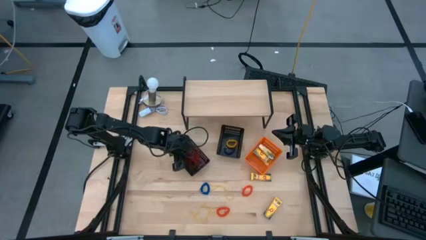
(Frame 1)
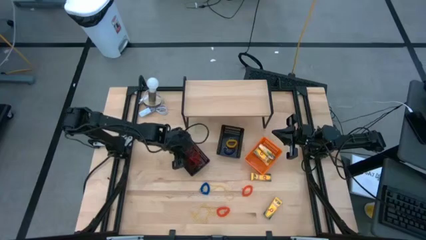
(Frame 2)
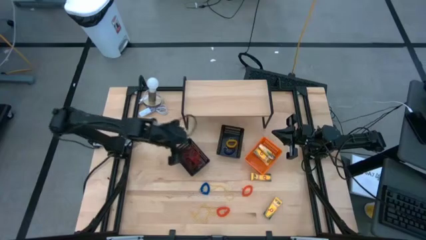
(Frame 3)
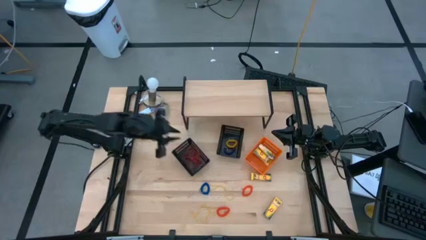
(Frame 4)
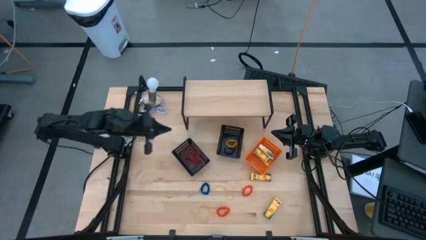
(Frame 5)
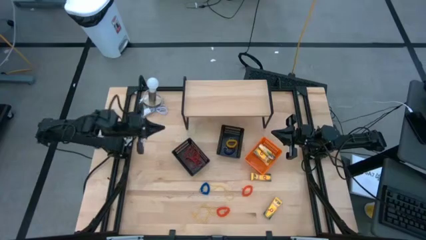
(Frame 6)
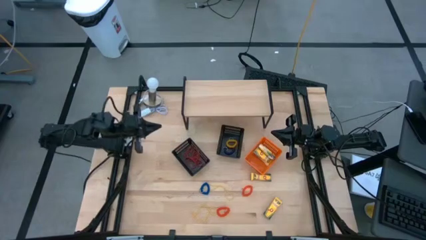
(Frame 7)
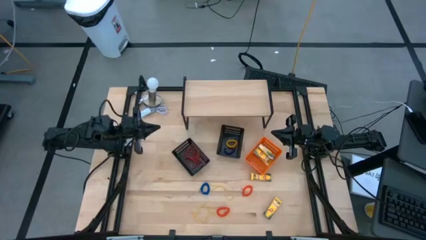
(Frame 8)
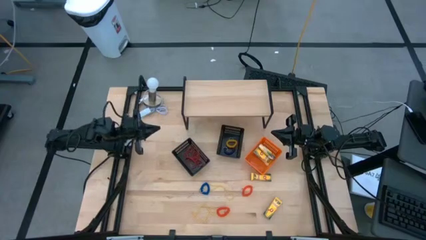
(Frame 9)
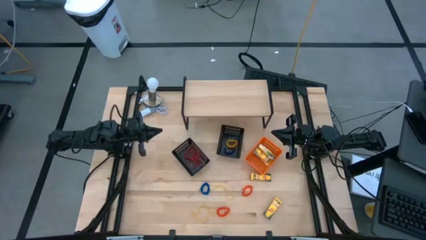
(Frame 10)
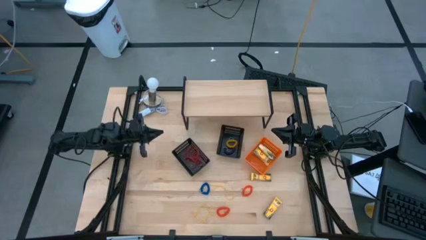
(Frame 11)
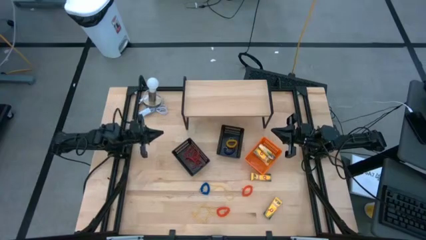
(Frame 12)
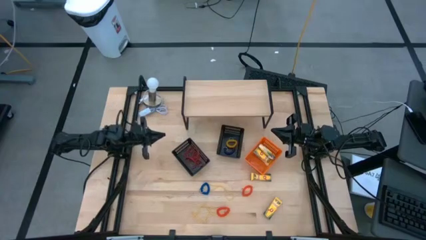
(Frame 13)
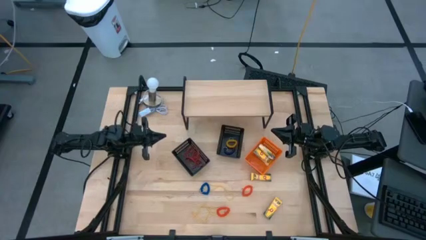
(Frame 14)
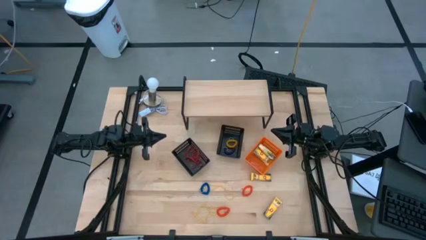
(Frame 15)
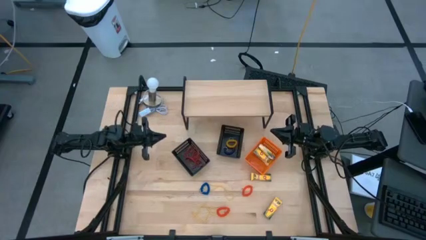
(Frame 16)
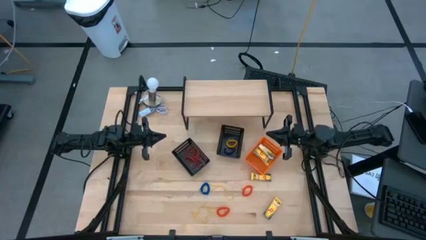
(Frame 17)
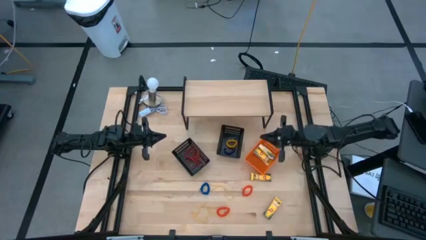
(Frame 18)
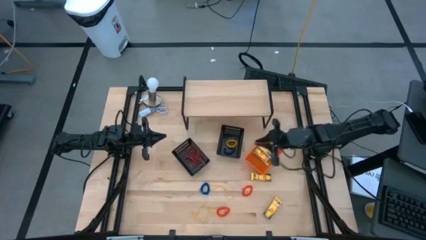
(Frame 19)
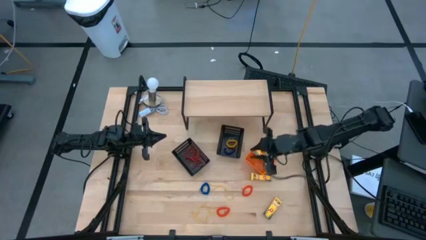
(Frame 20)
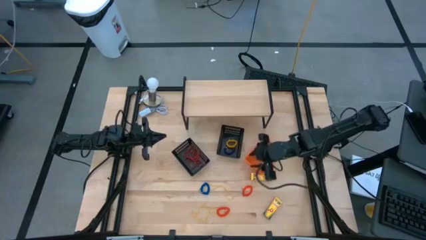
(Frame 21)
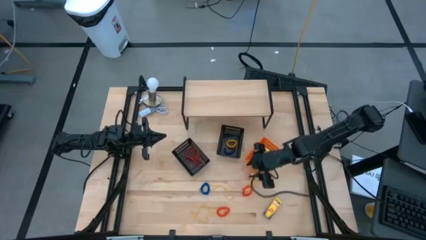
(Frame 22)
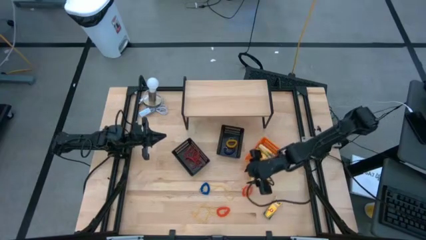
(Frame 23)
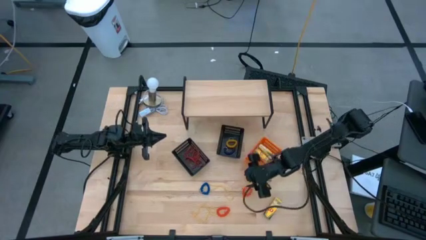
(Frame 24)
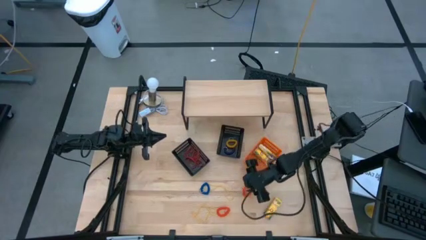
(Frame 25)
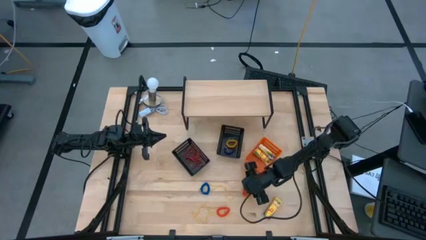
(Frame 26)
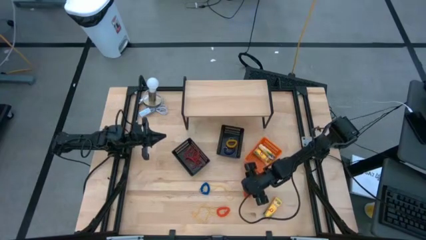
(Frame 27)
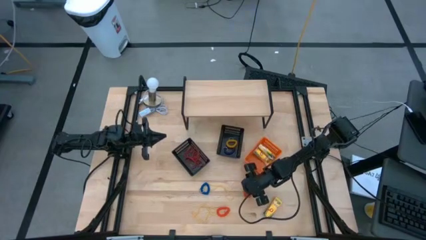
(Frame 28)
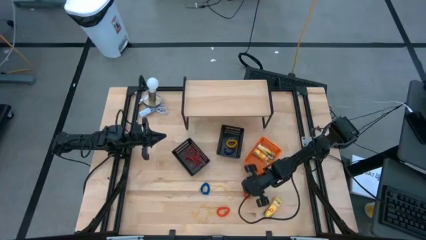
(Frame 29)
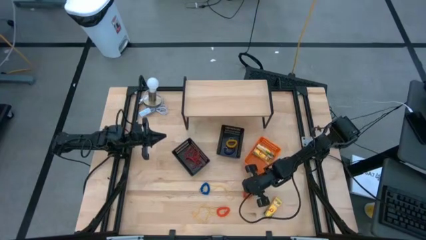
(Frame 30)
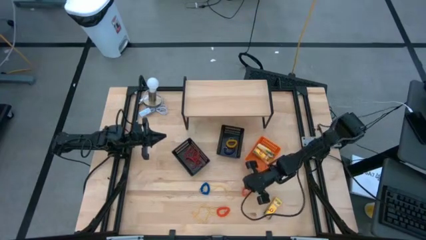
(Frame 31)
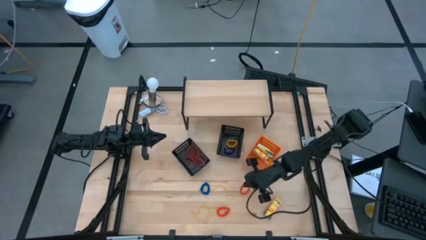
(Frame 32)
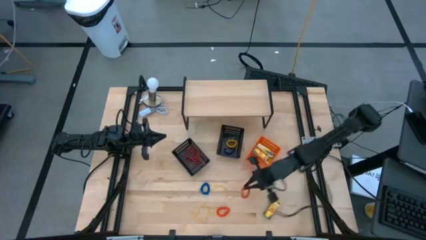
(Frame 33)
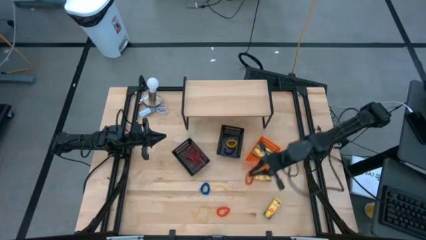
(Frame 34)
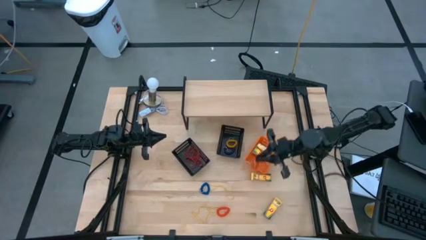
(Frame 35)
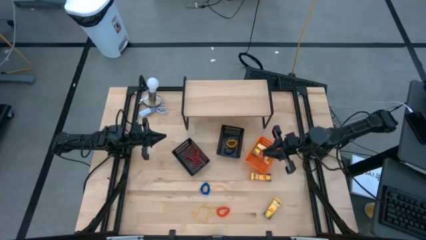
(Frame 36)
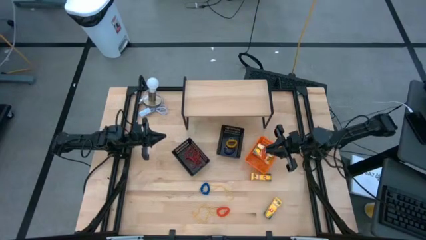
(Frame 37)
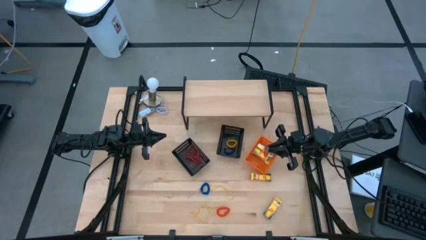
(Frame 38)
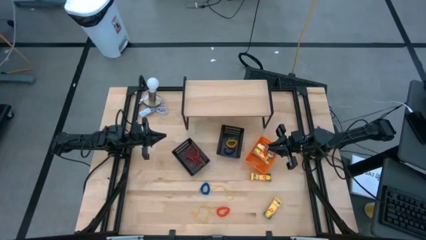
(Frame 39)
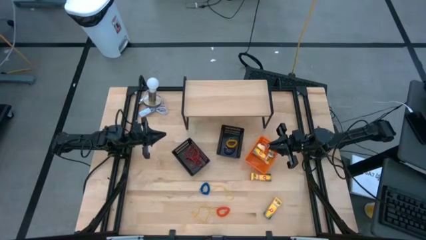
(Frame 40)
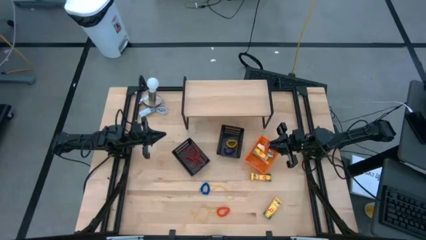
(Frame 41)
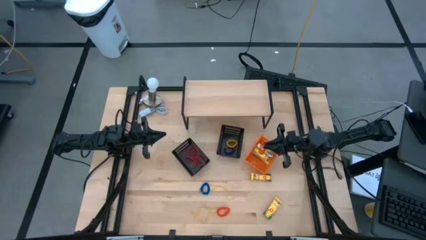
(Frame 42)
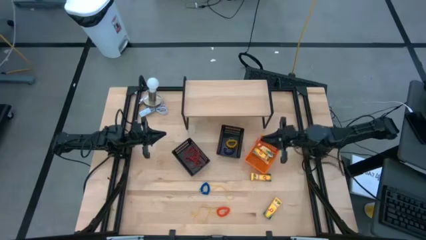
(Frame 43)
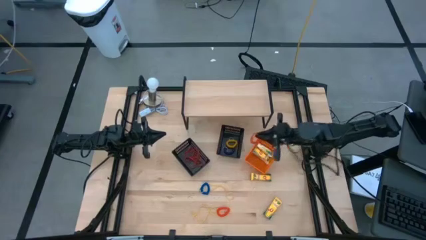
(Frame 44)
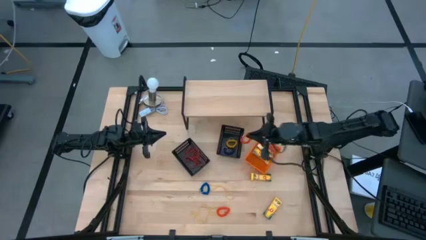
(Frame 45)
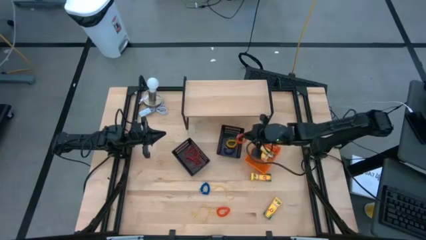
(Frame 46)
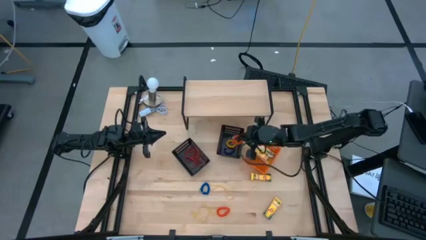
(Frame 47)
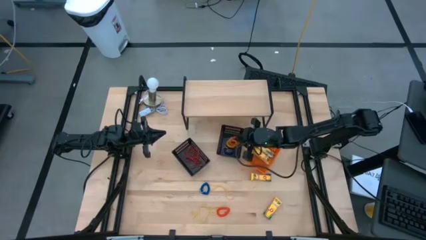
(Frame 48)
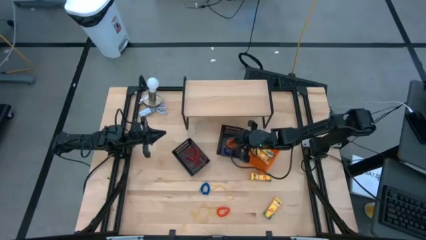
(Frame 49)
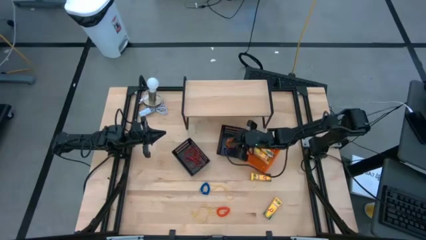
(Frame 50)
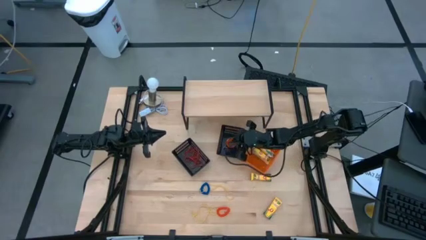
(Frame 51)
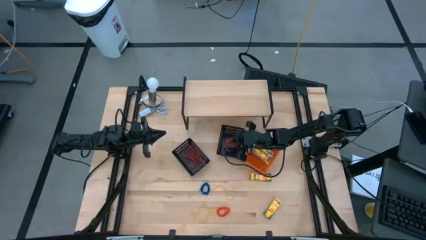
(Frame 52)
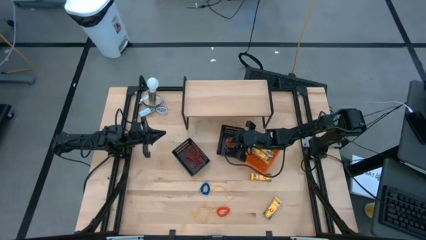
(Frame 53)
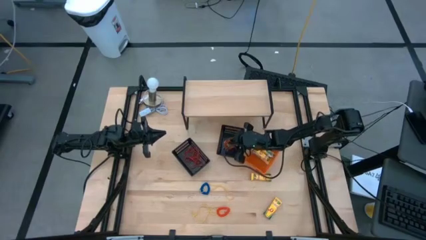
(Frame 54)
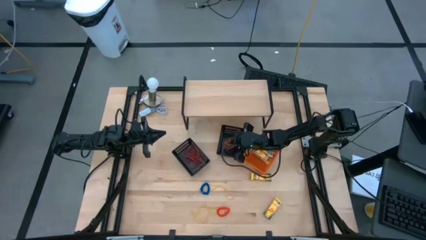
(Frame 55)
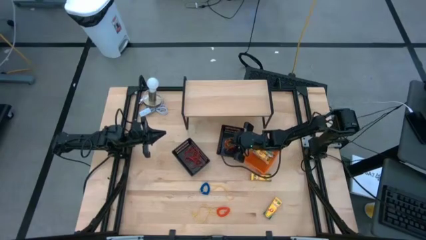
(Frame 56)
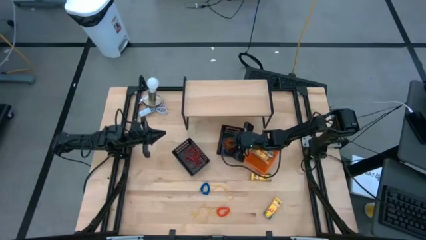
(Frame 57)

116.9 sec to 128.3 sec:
Task: Pick & Place Office Desk Supplies
Put the orange spring keychain into the right black bin

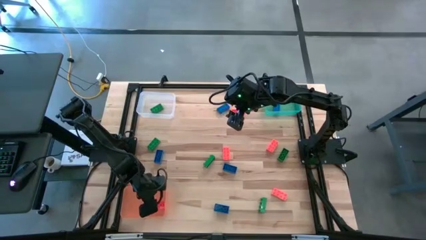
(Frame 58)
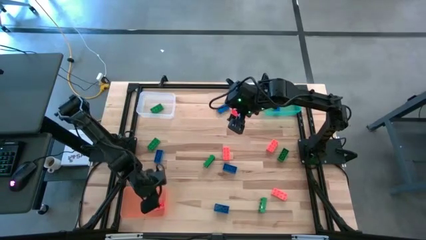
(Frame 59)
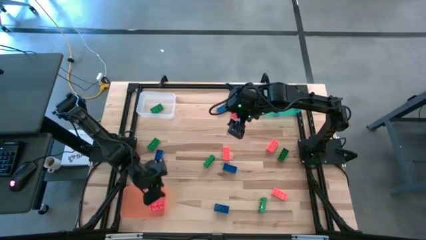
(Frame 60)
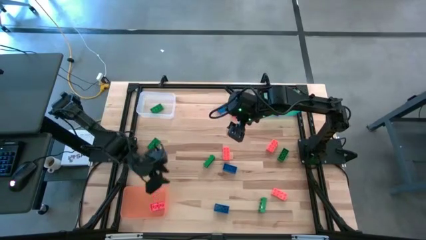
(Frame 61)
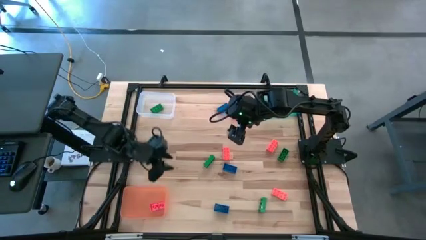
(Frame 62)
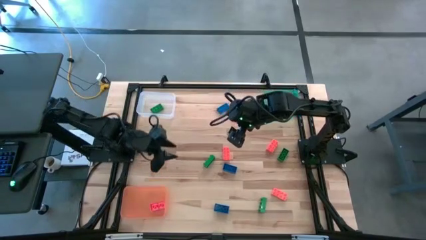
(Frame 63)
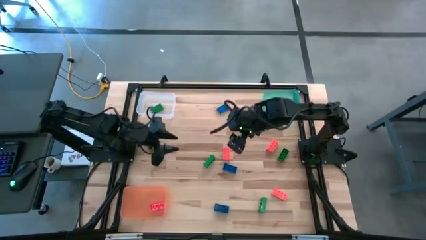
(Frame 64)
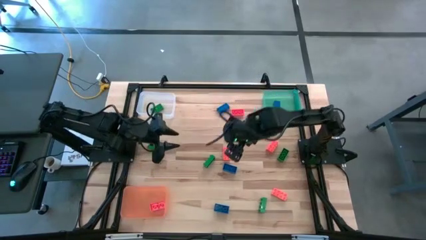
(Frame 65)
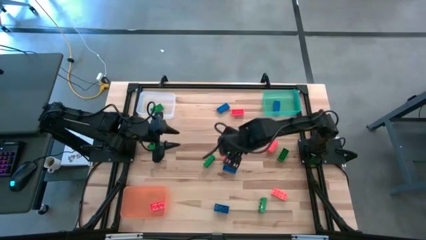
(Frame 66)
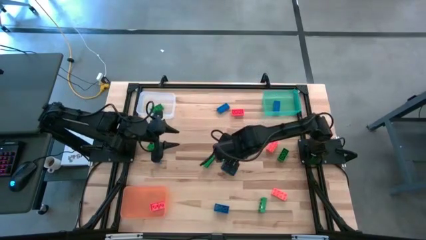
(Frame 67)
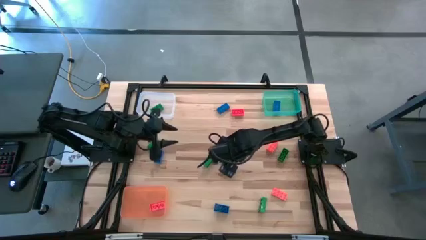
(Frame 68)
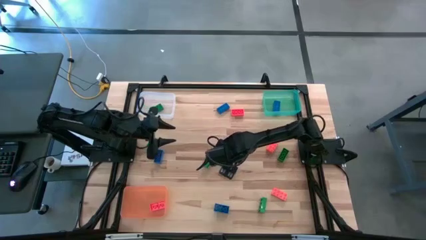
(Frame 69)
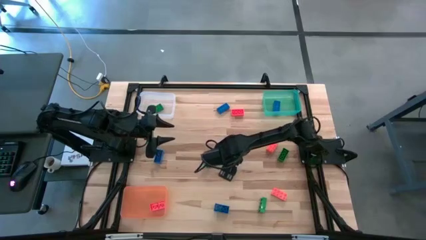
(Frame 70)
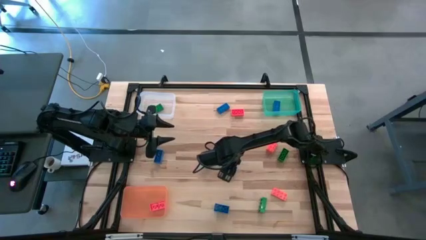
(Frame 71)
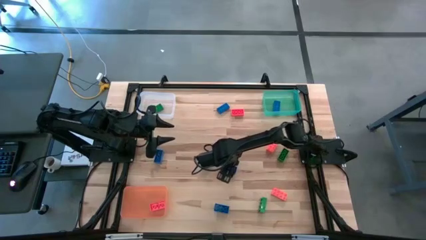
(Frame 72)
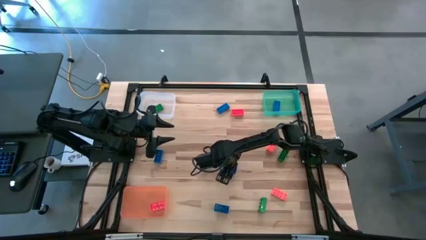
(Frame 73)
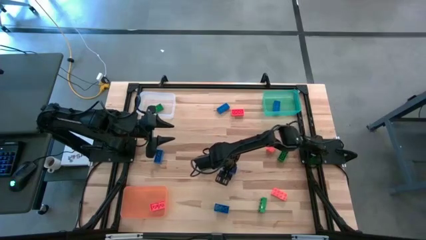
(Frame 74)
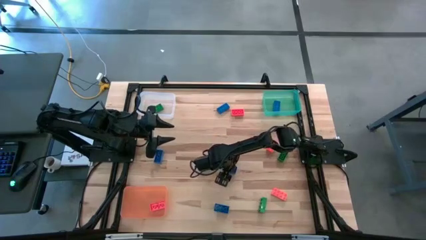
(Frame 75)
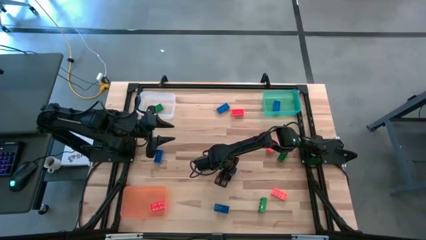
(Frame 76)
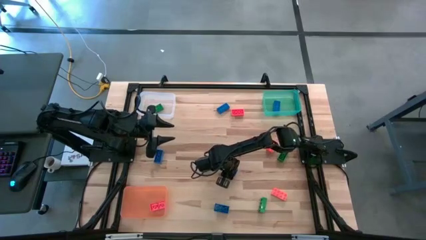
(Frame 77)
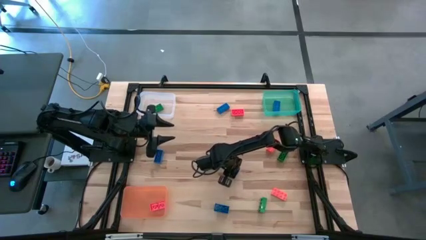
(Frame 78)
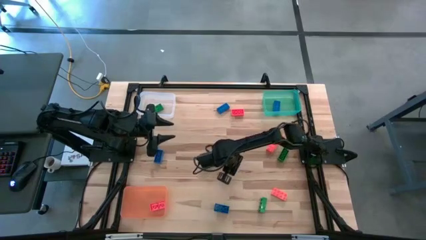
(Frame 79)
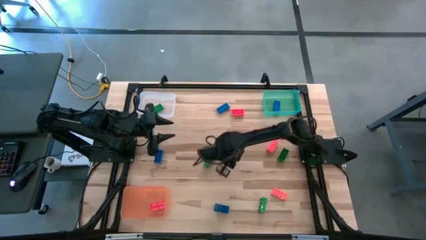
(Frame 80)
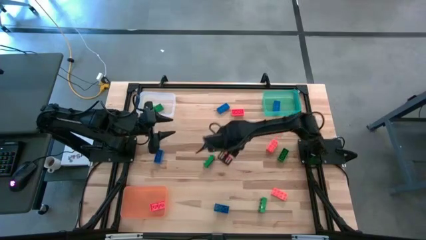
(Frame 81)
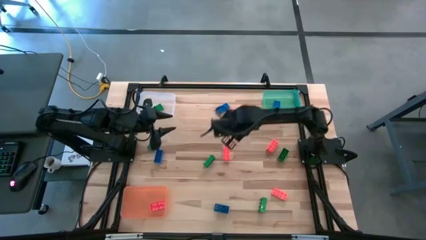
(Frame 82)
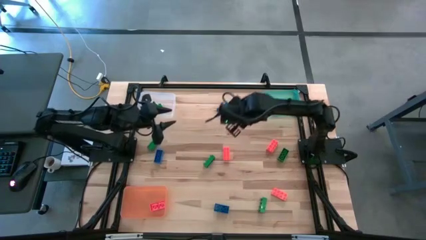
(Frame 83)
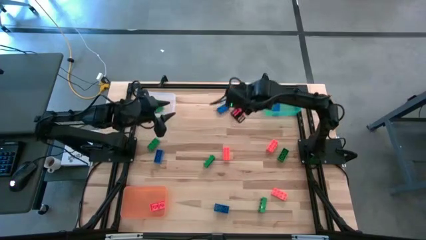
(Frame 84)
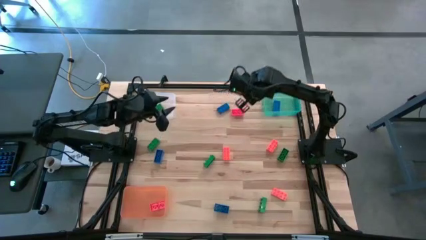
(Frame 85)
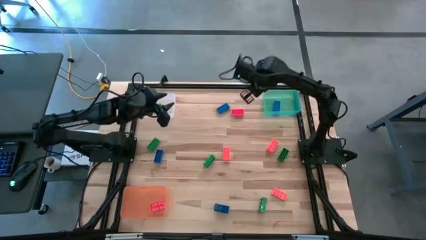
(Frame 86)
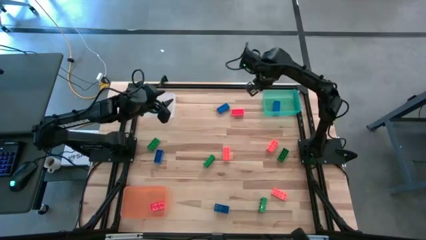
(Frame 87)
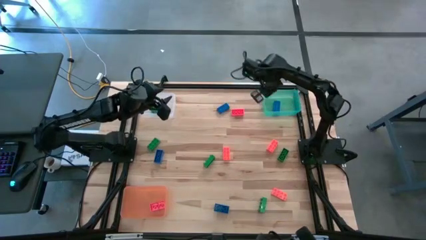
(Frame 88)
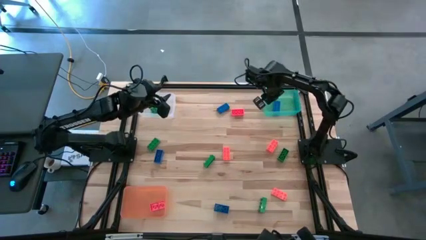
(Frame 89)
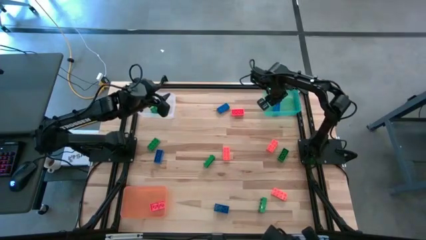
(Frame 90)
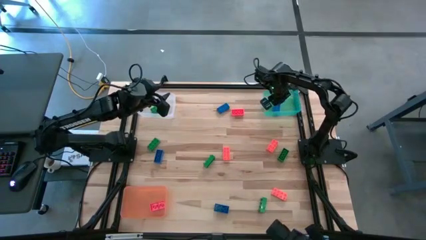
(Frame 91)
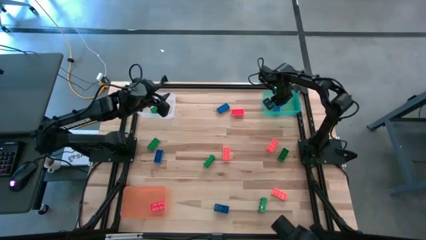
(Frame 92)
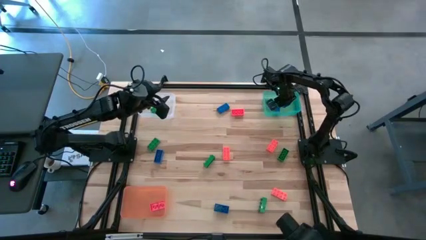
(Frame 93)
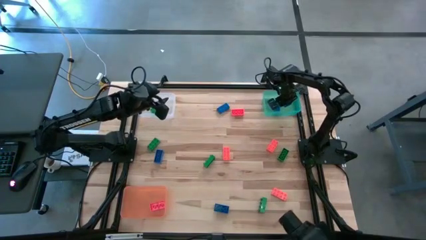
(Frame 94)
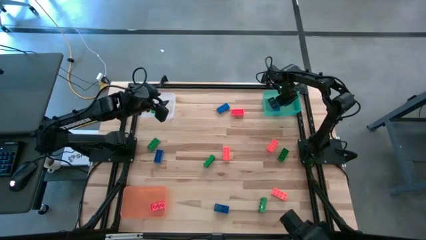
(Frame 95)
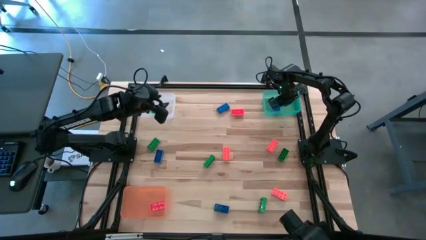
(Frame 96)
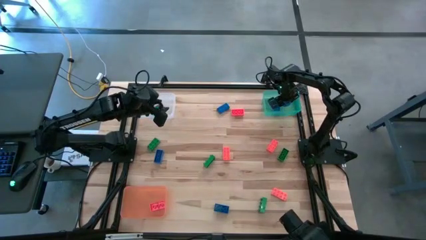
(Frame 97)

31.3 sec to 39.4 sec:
Task: Sort & place blocks by color
Put the blue game piece into the blue bin
